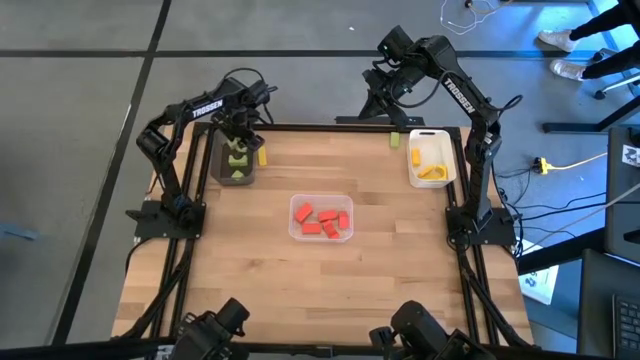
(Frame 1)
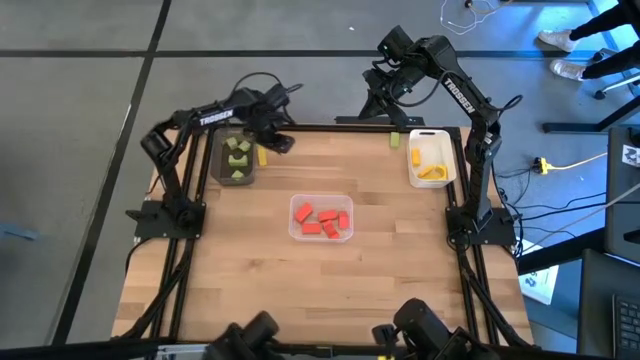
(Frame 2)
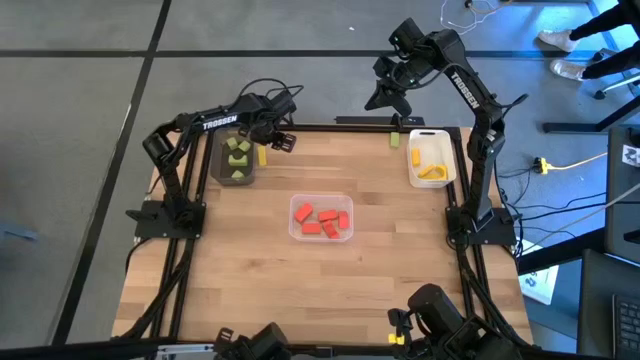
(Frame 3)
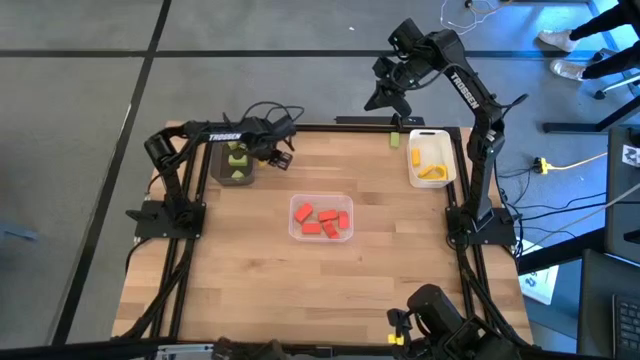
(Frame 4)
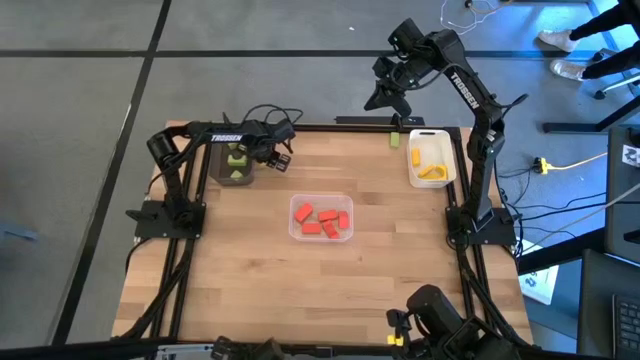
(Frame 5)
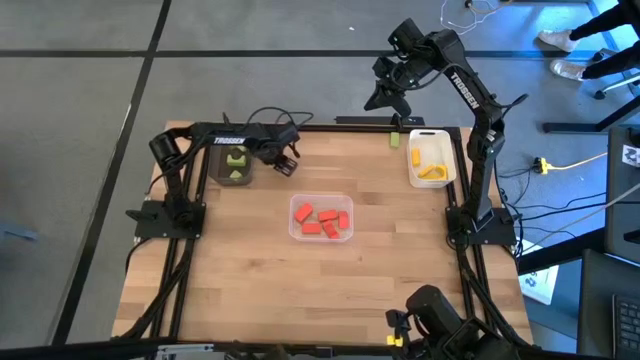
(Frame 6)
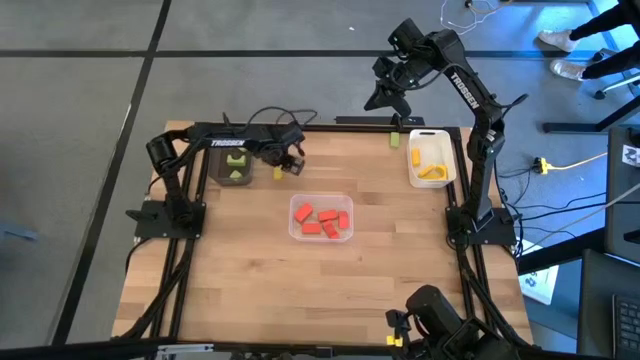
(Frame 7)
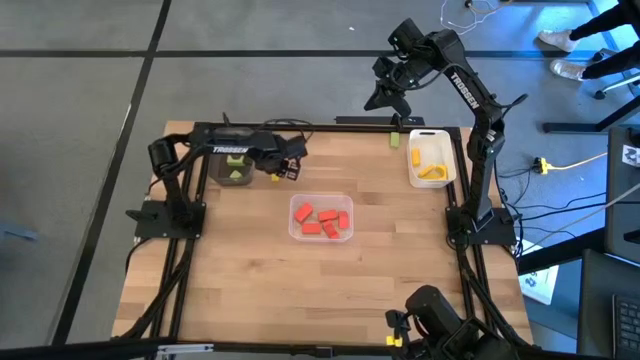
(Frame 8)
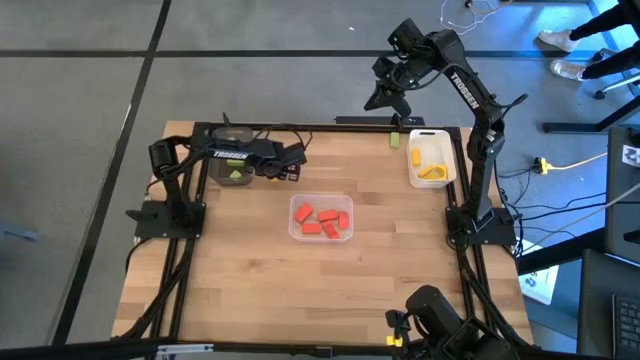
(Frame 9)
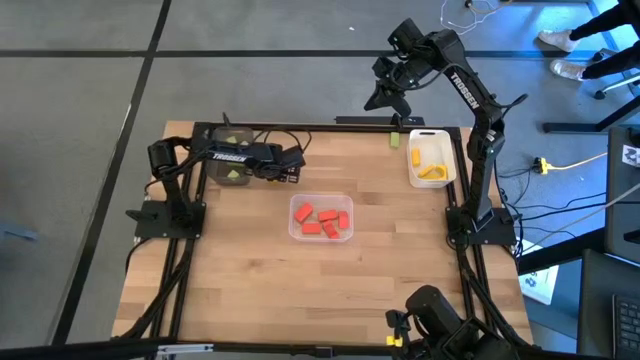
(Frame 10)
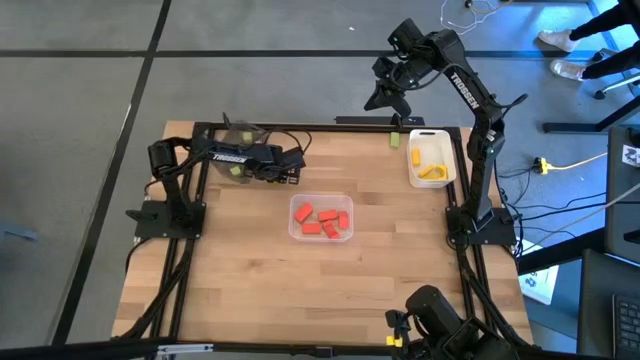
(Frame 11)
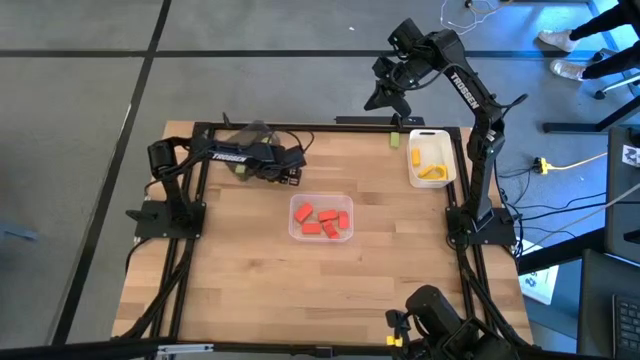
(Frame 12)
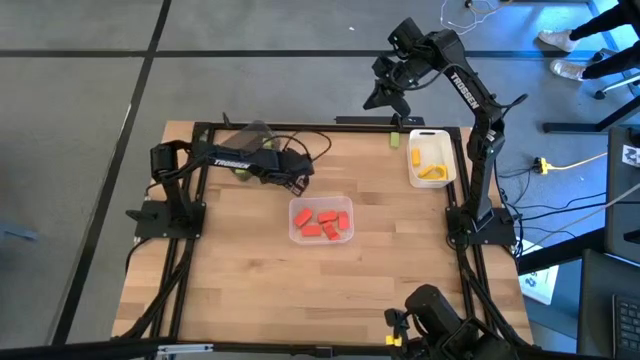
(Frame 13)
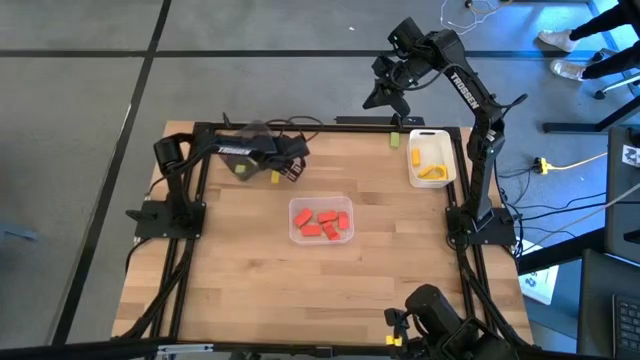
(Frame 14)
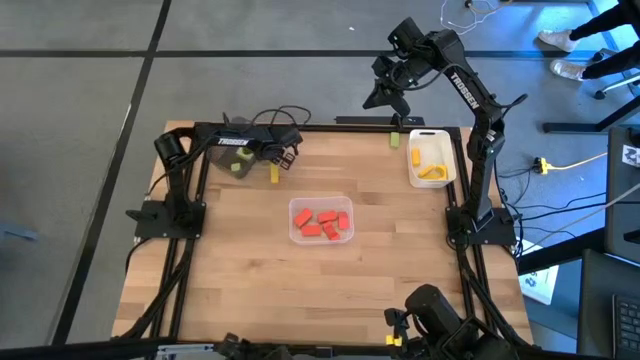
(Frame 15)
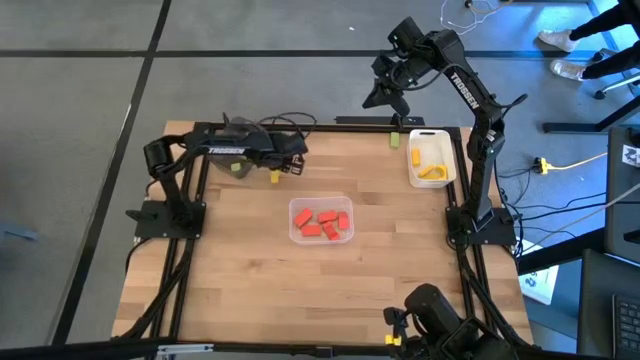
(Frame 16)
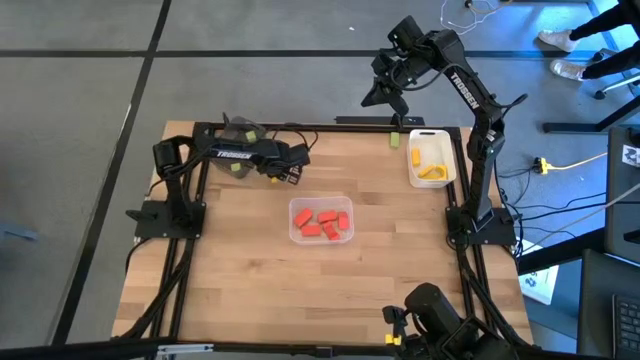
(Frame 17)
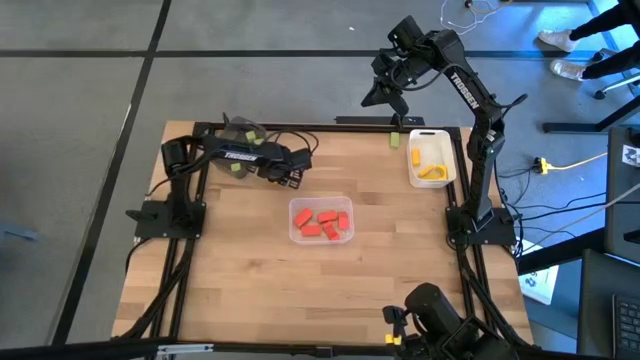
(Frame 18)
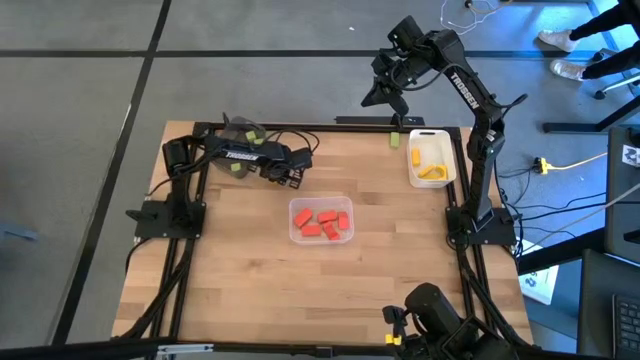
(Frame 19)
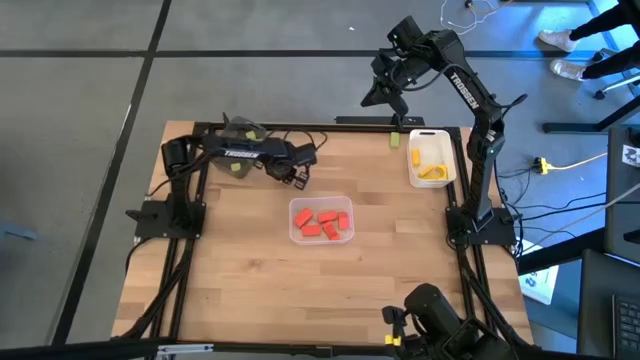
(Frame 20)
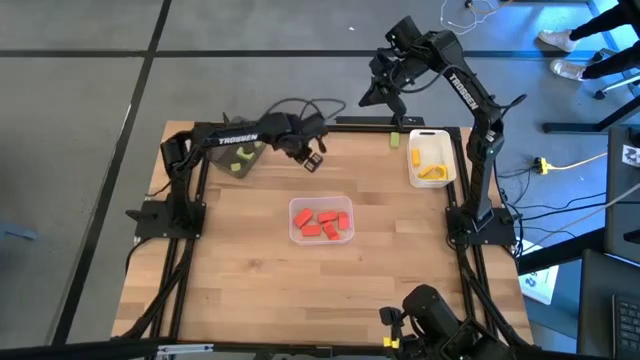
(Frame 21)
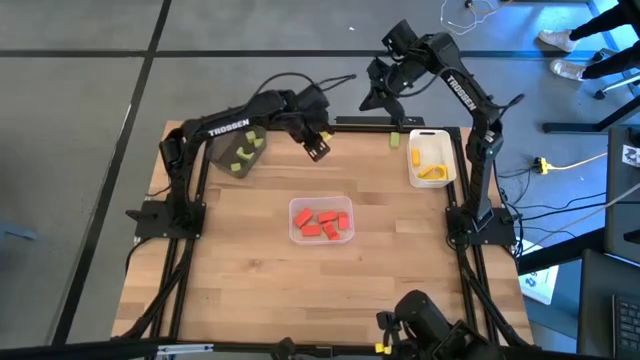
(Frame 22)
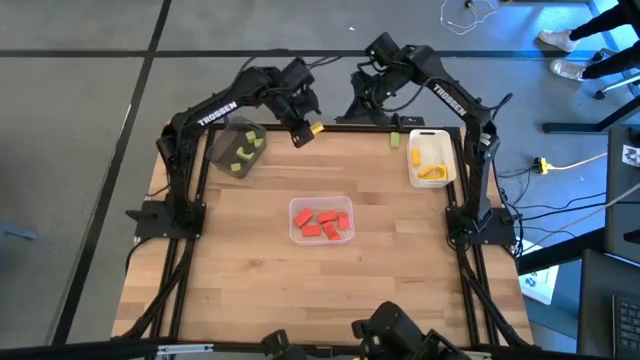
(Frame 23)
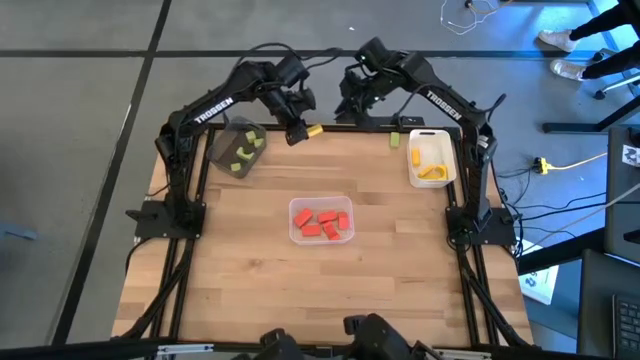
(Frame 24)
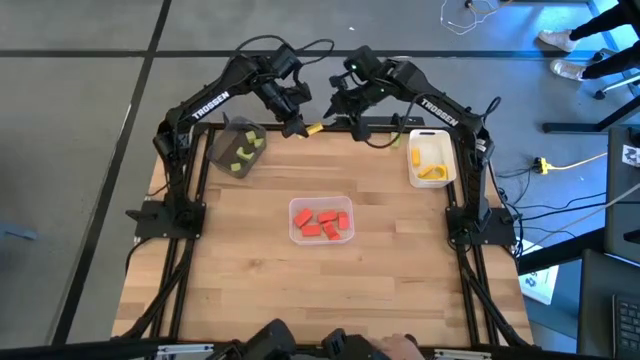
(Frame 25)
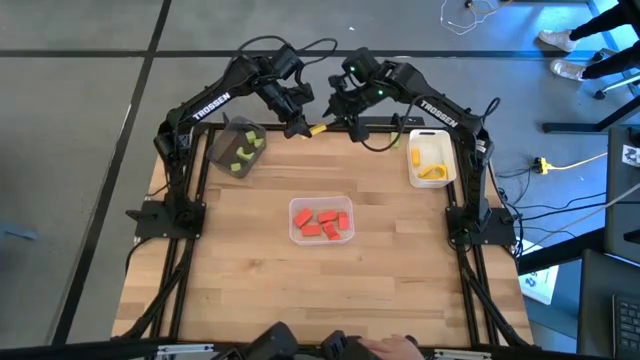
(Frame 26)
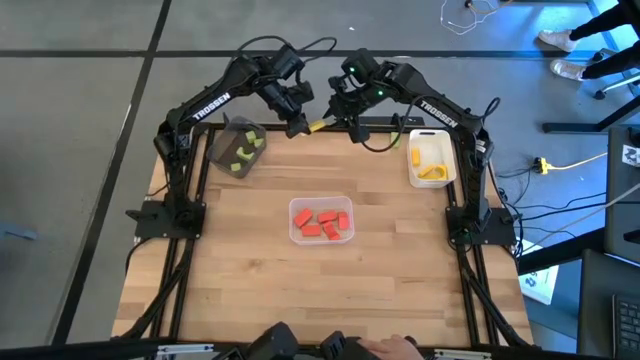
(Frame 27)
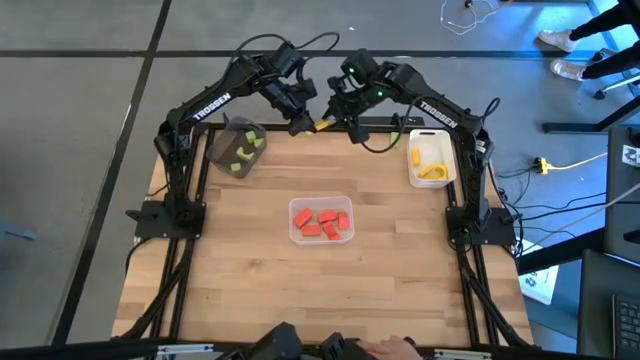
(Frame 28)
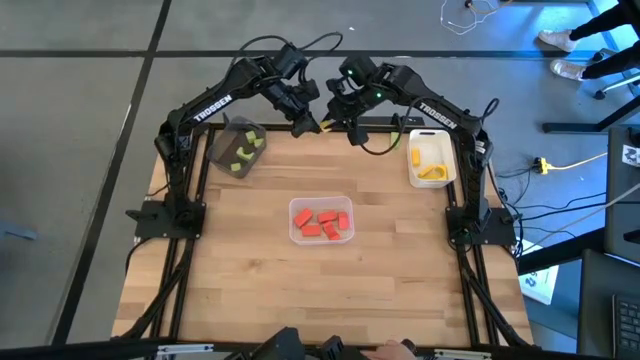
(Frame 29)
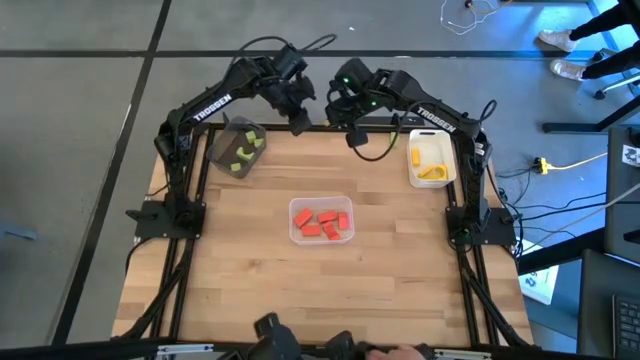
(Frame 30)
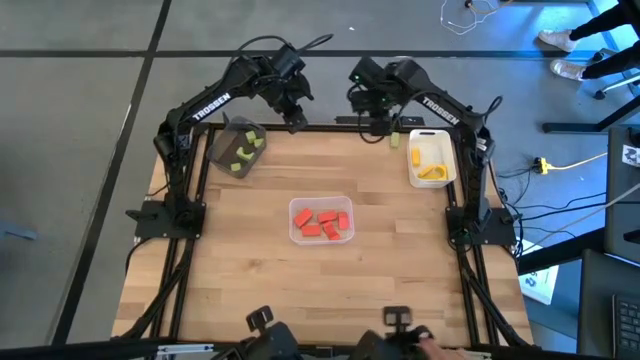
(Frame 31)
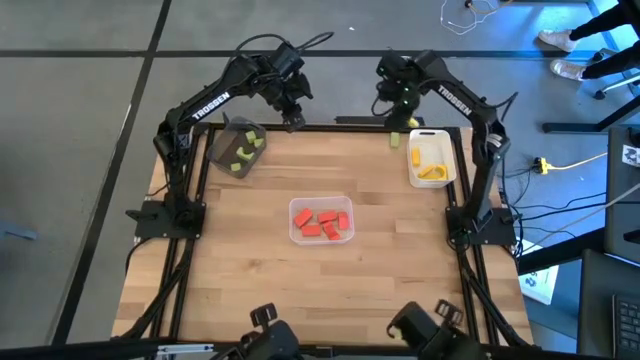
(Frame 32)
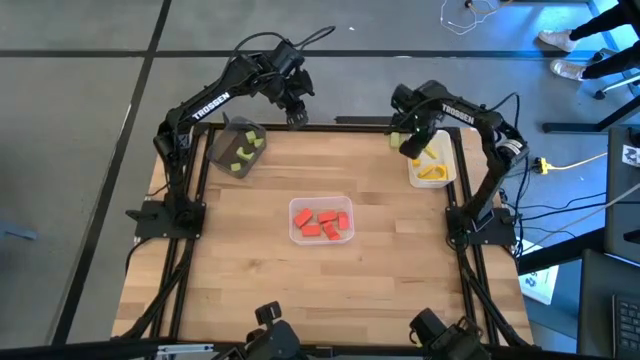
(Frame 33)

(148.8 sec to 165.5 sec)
Task: Sort & place blocks by color
Put the yellow block into the white bin

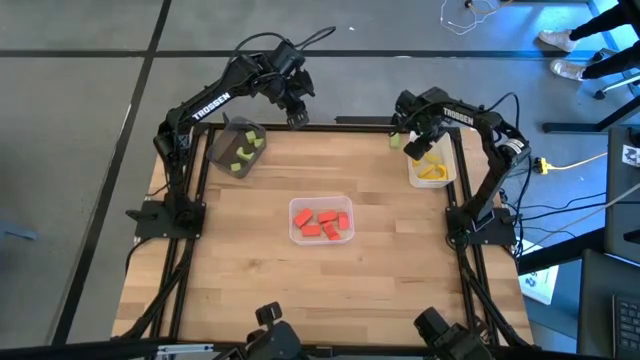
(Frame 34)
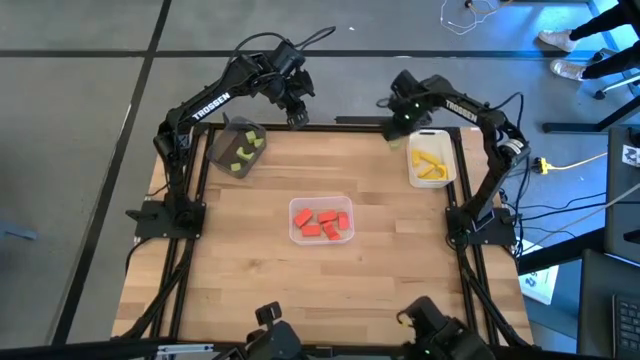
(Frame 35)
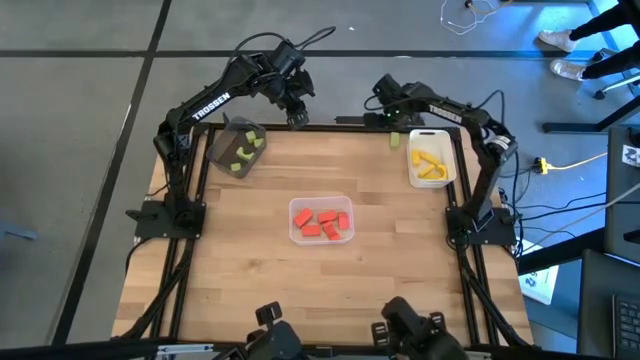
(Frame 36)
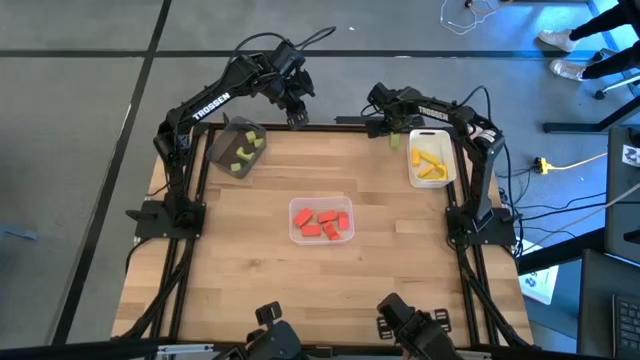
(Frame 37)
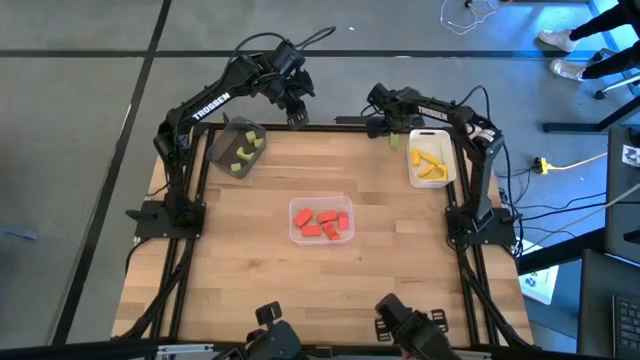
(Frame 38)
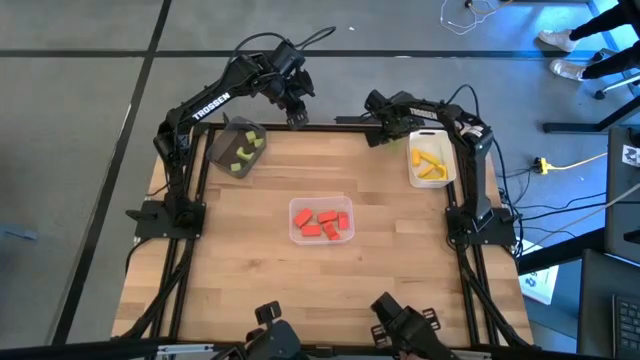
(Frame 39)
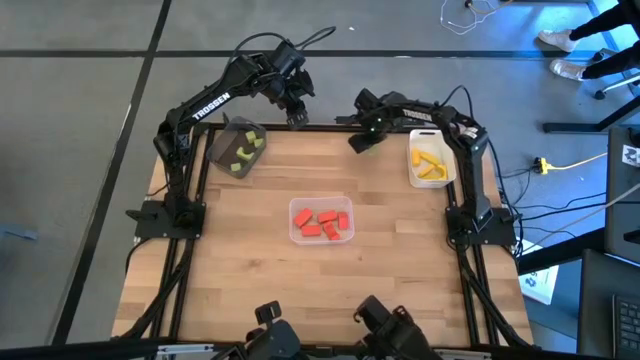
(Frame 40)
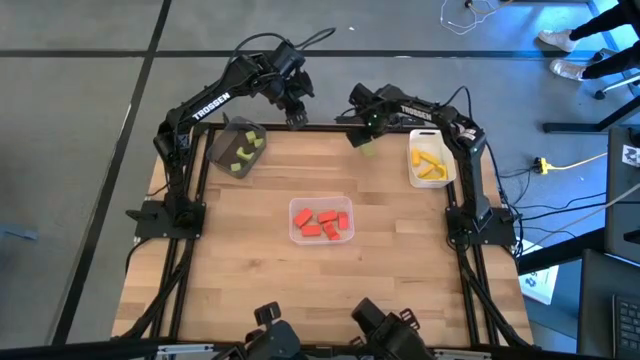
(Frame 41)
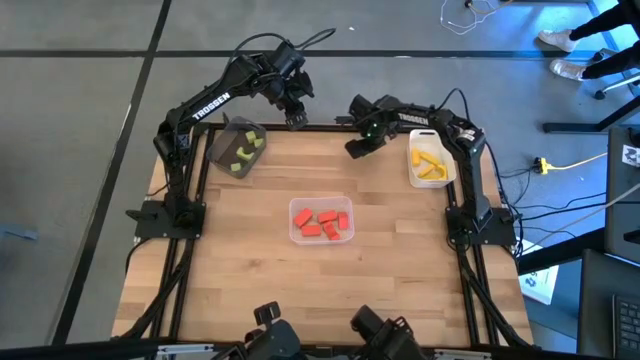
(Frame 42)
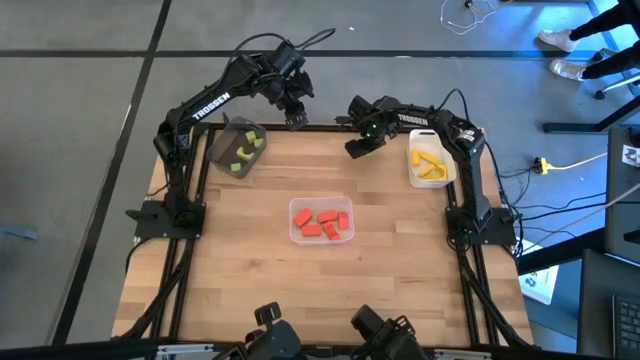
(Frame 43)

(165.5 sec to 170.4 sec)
Put the green block into the black bin
